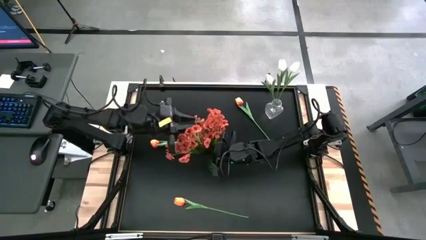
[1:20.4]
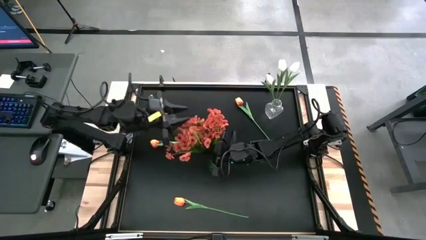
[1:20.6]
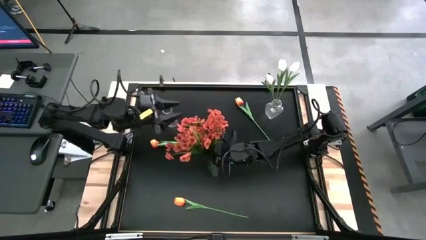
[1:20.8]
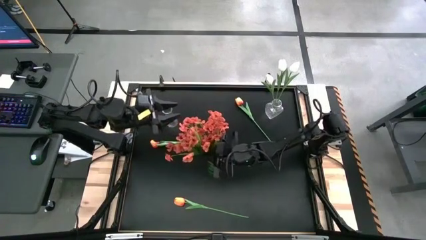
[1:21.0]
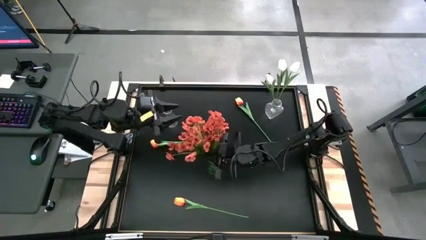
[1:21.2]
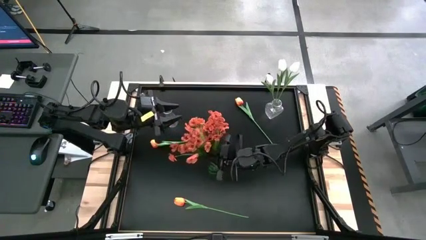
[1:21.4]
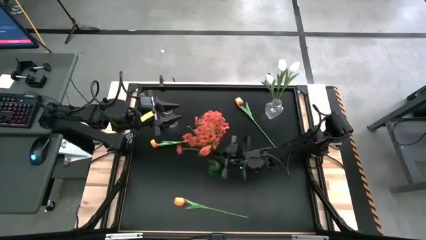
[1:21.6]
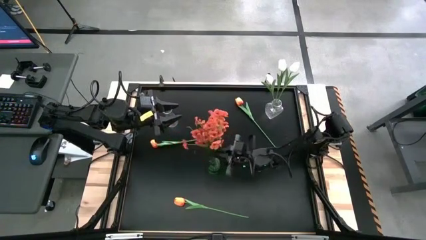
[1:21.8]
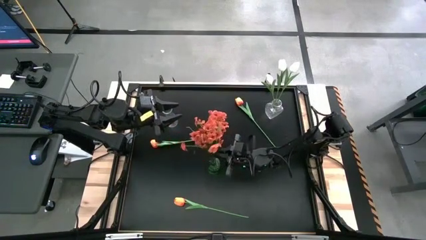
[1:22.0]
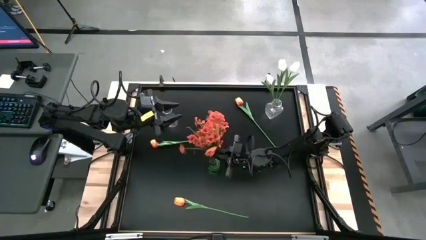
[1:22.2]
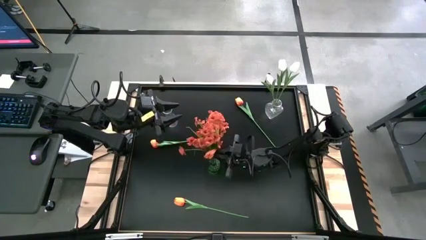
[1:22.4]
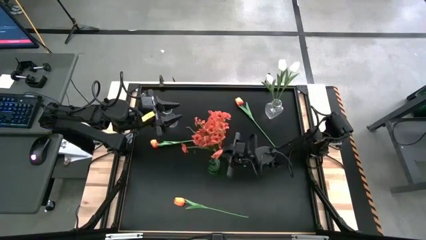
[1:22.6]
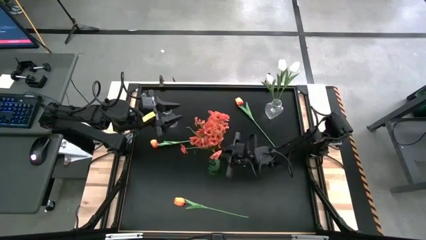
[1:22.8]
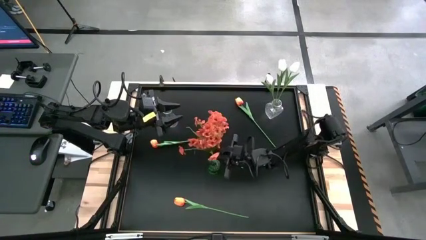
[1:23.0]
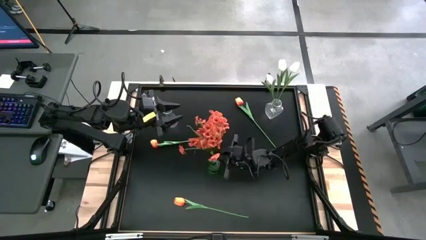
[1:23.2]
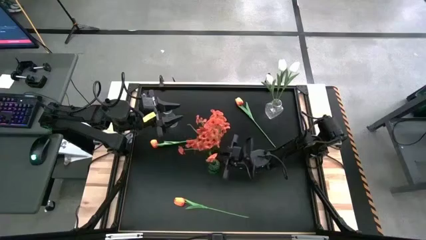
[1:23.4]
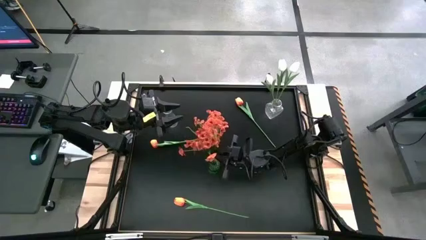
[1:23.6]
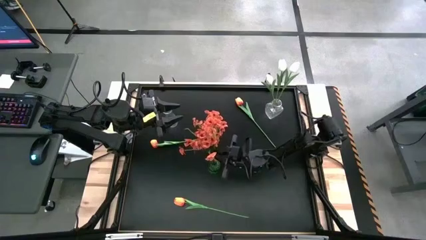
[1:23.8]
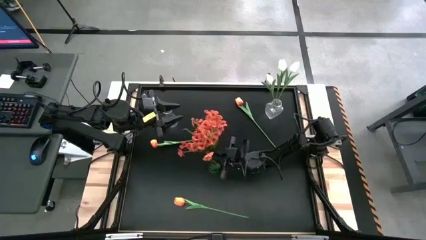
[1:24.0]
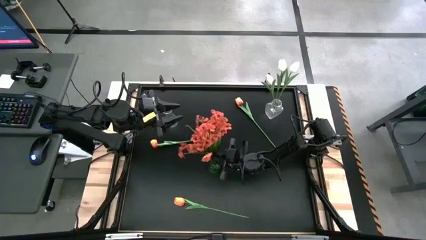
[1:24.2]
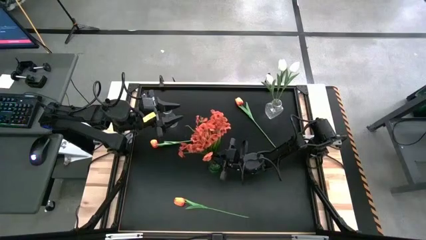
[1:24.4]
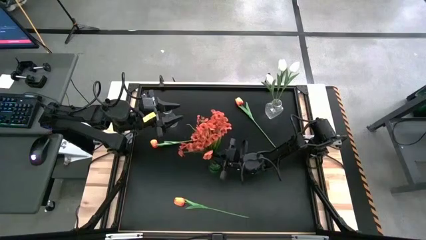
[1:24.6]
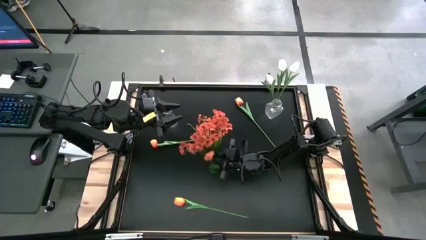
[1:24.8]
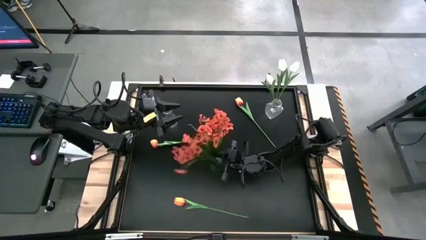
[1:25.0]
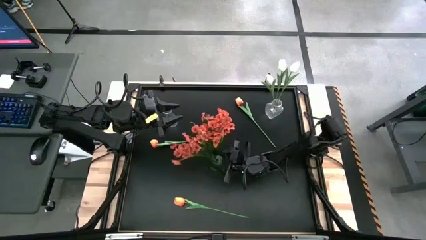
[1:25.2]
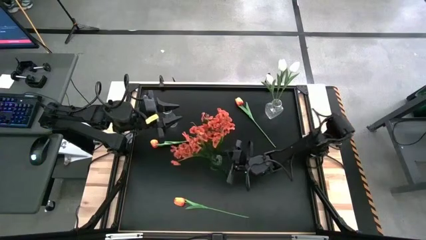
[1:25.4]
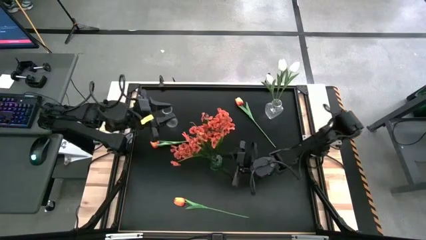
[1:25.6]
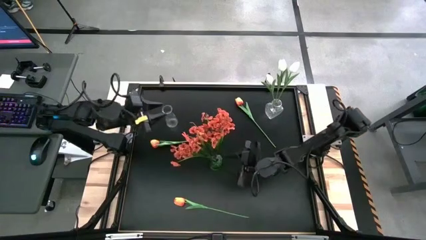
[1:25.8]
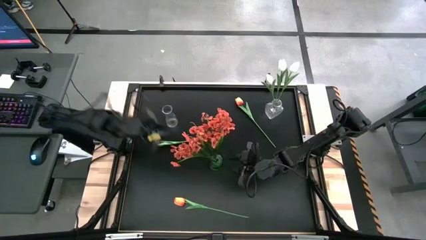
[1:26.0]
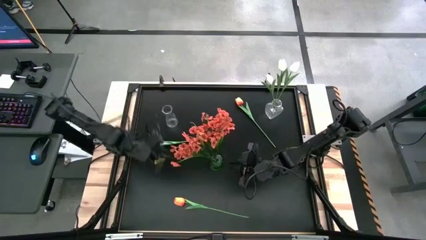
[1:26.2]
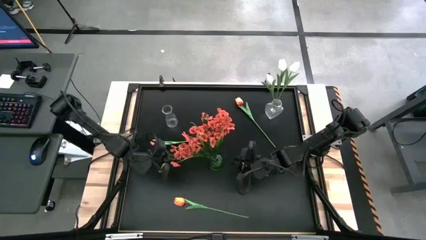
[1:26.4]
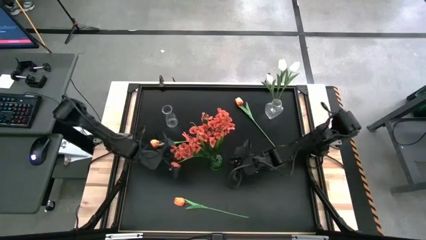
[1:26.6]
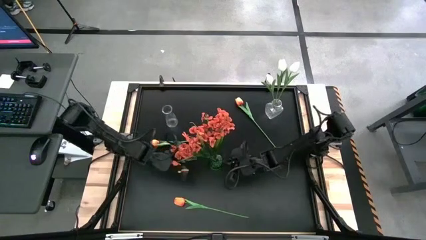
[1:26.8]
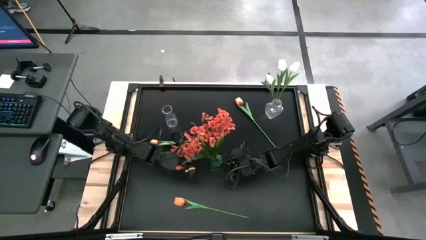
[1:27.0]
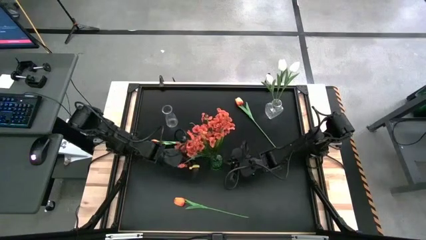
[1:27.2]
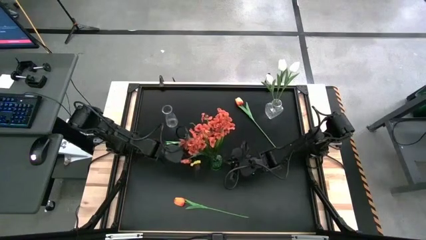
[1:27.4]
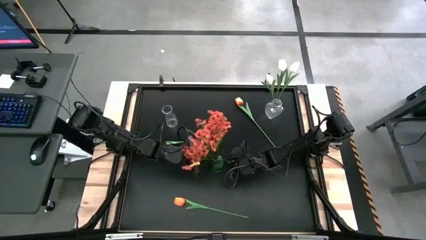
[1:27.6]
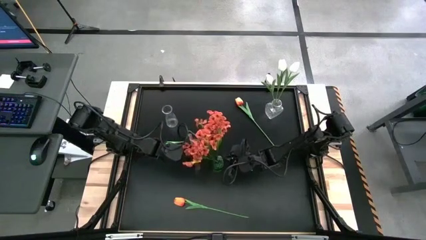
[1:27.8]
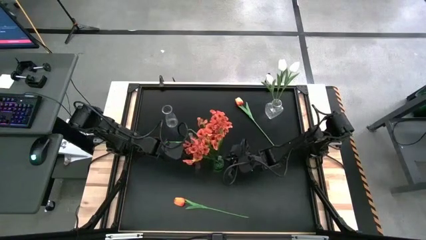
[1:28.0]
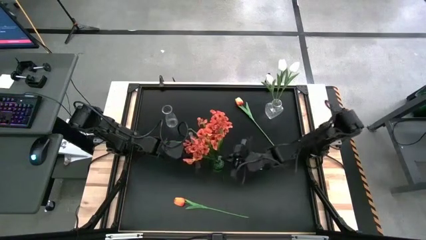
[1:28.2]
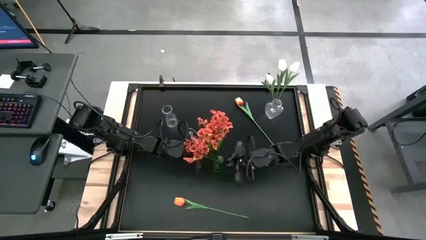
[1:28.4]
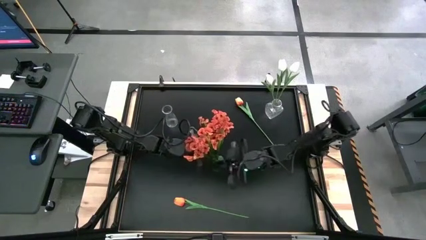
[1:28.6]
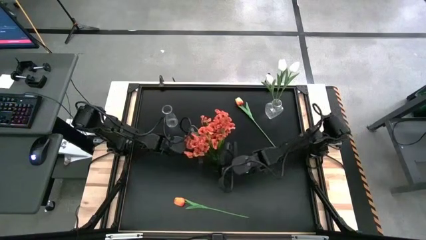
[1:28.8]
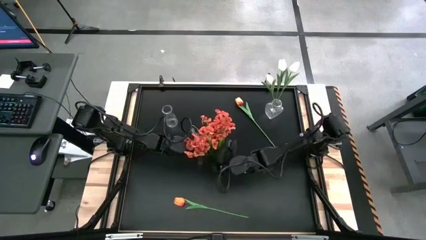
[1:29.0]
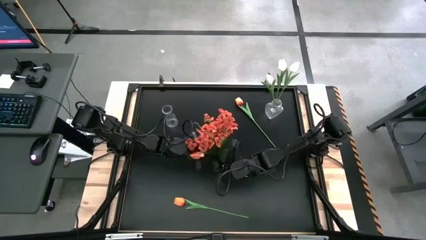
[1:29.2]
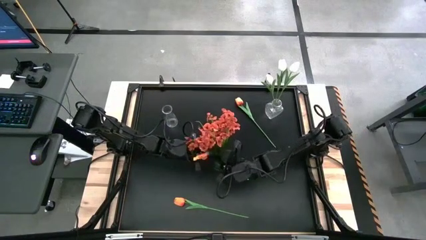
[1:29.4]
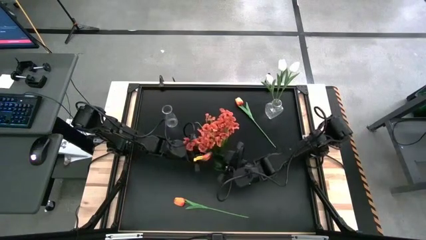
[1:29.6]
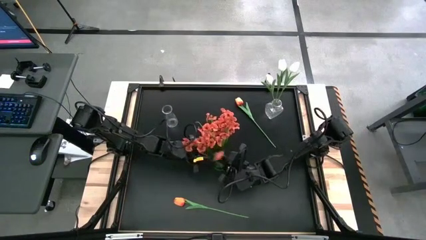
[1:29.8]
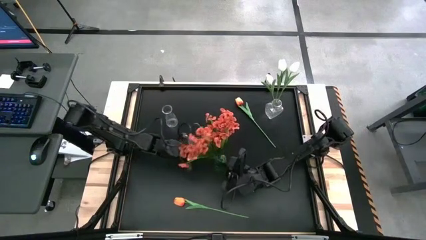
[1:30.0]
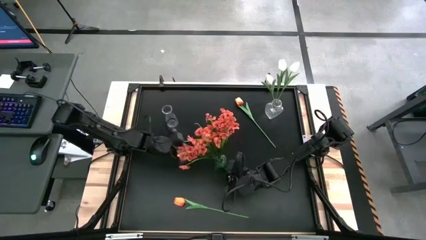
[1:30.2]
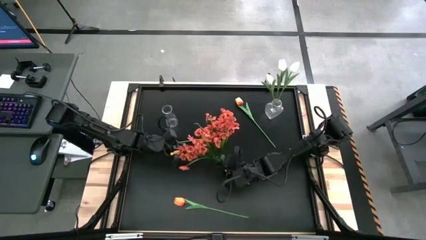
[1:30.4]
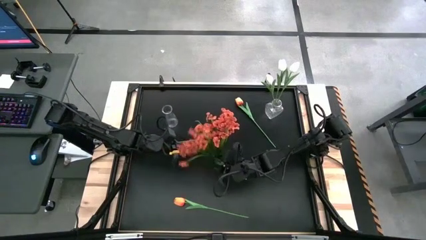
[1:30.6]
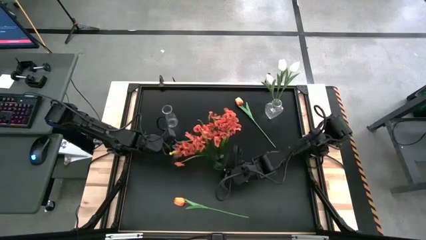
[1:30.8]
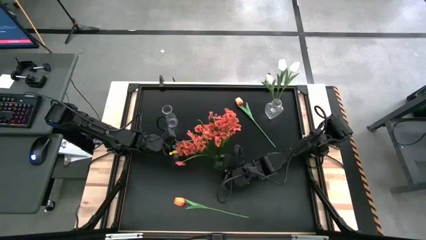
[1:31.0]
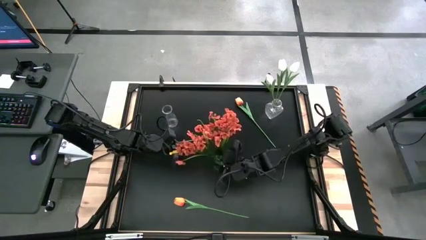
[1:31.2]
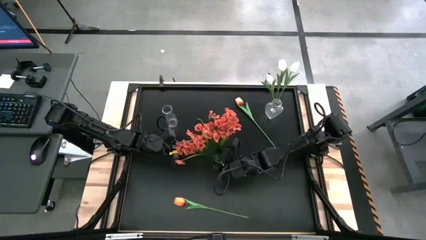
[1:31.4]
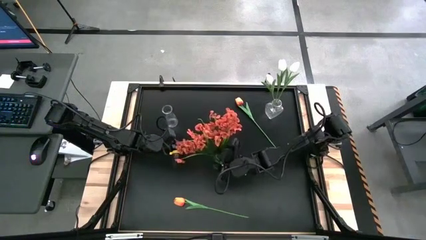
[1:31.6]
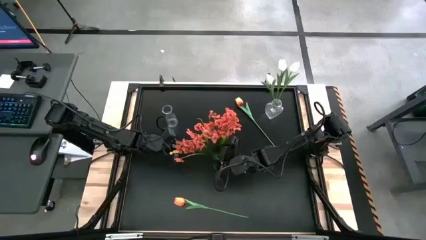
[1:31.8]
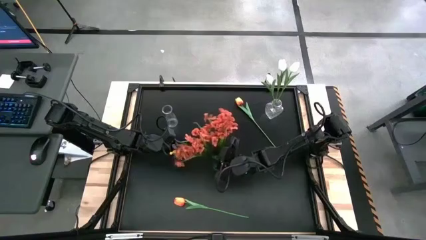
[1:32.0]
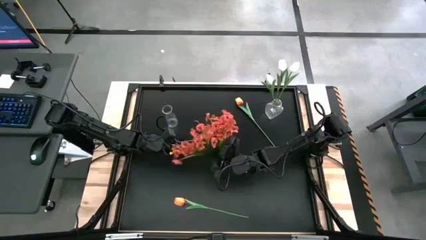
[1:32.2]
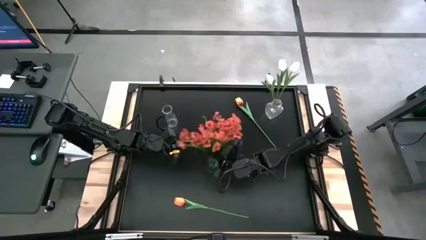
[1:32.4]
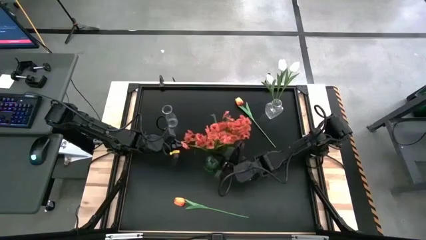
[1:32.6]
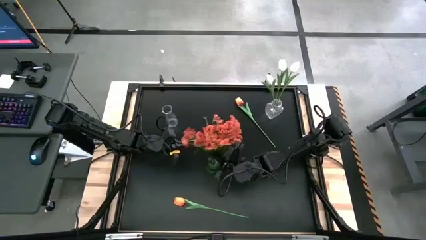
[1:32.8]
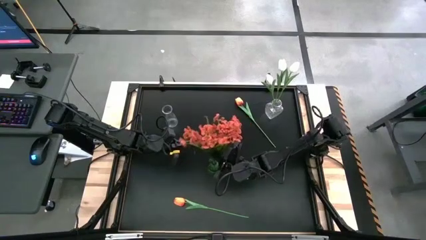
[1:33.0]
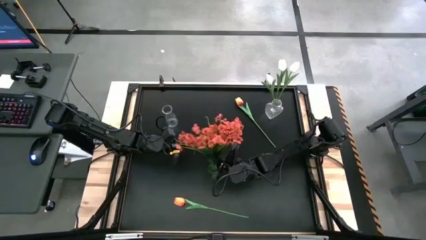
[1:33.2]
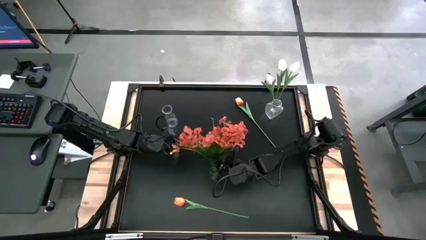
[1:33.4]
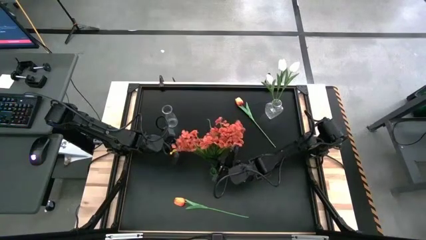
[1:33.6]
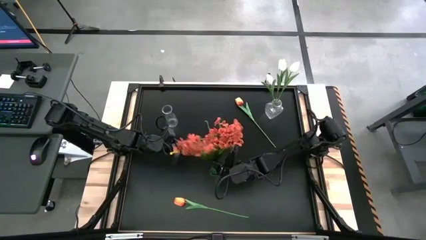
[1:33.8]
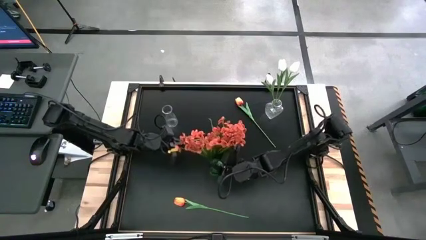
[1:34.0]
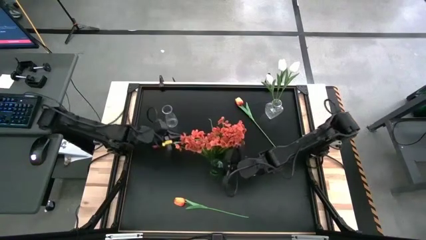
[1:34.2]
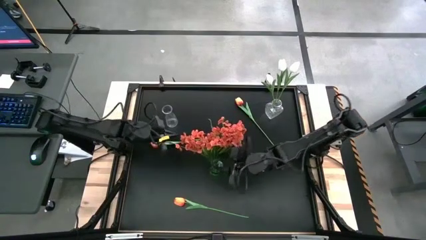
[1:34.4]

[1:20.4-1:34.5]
Task: Sort flowers into vase by color
Put the orange flowers into the green vase

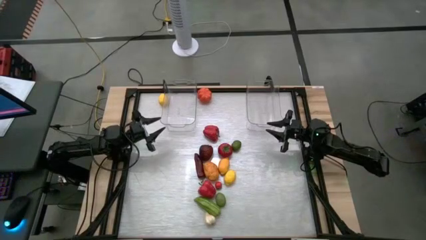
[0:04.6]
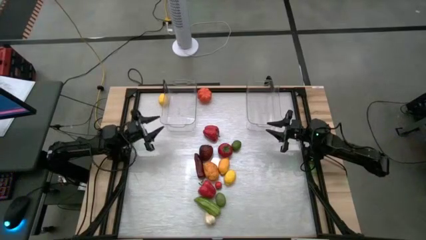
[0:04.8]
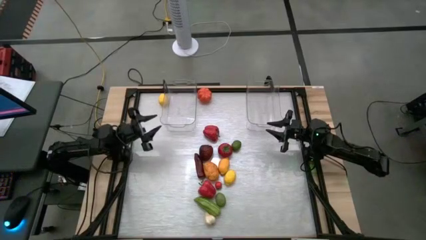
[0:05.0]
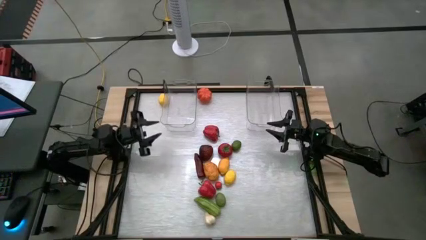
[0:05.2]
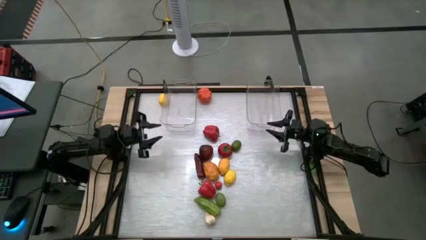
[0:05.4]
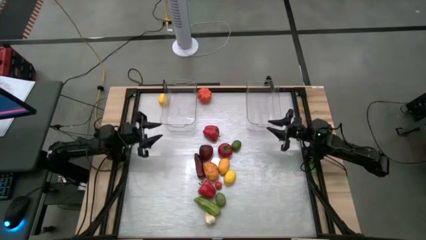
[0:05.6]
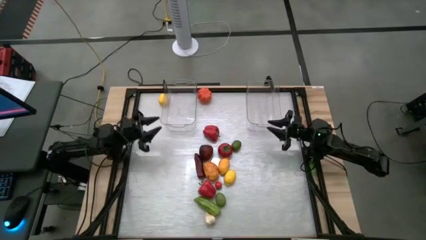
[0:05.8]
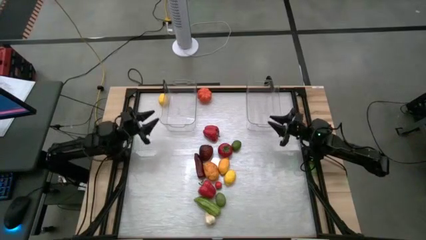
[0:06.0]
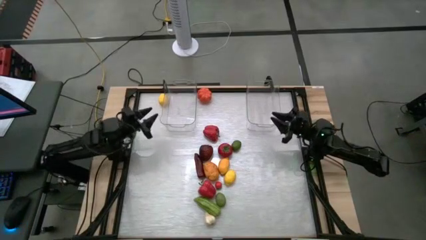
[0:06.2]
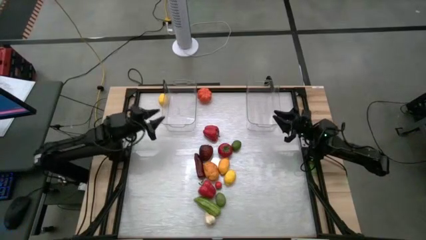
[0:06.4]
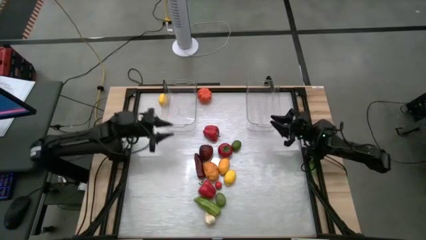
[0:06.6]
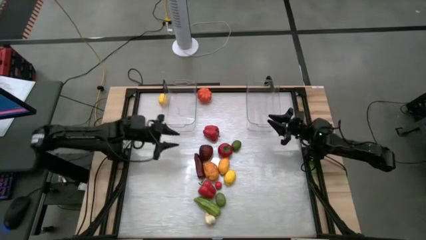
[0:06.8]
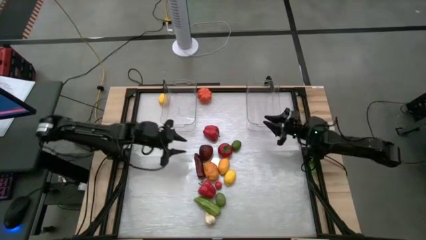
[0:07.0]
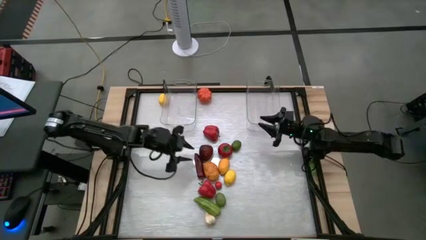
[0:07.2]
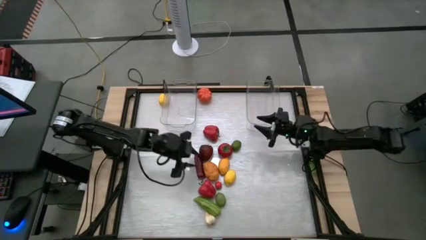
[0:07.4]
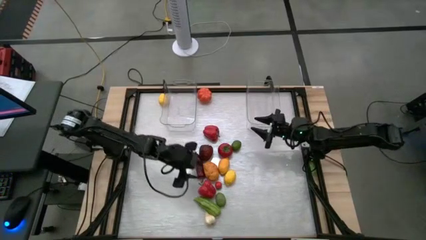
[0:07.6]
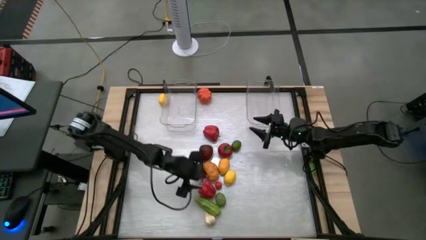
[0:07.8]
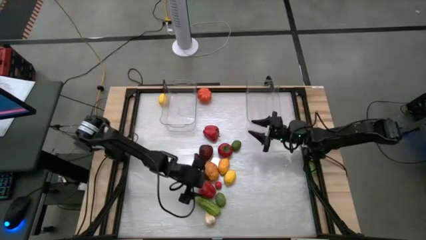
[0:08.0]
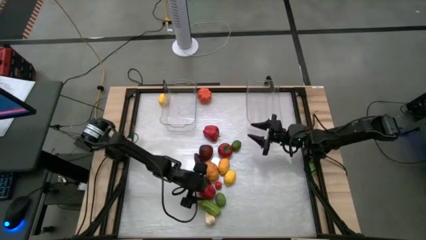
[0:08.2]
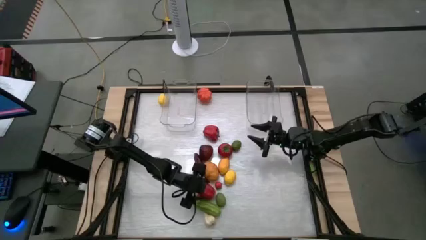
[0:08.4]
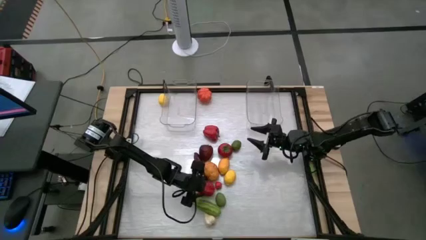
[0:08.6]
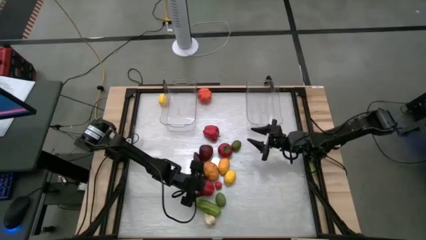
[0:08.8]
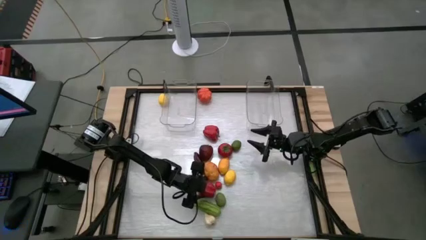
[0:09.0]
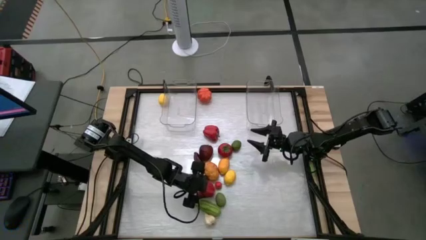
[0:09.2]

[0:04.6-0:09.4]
Task: Sort produce into baskets
Put the bottom bell pepper into the left transparent bin
